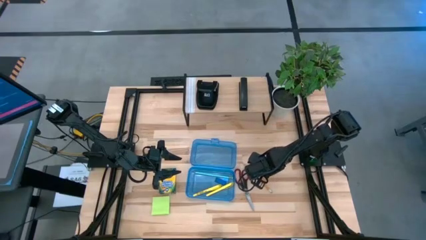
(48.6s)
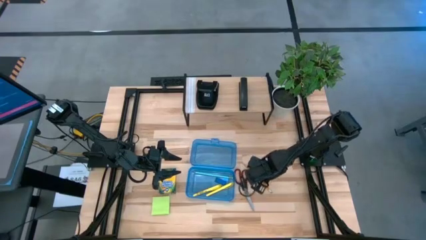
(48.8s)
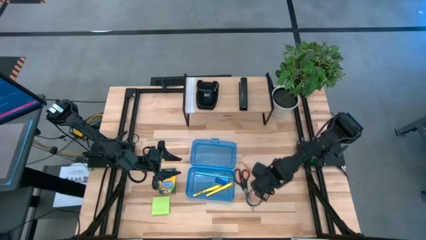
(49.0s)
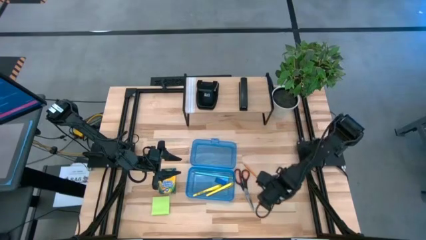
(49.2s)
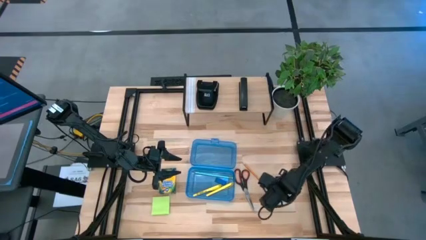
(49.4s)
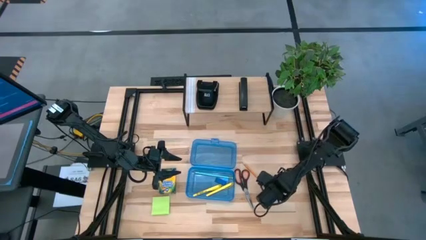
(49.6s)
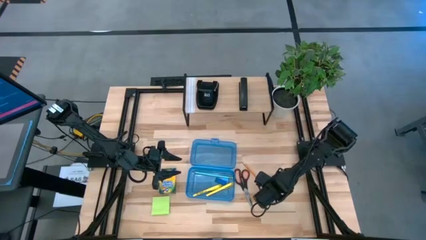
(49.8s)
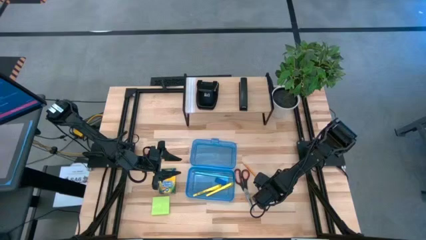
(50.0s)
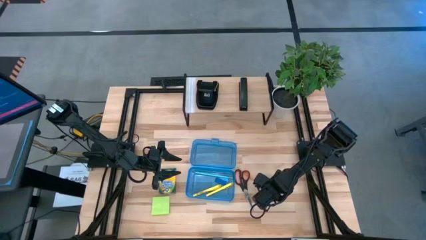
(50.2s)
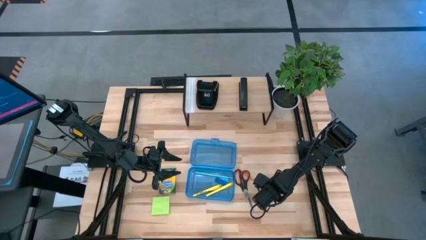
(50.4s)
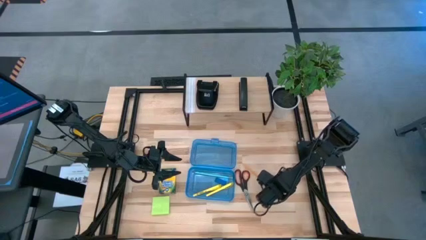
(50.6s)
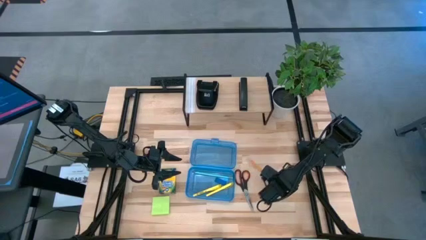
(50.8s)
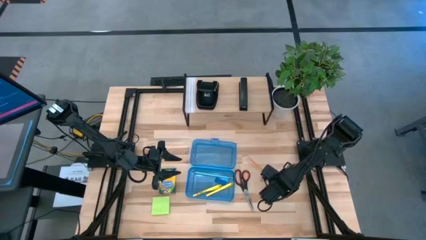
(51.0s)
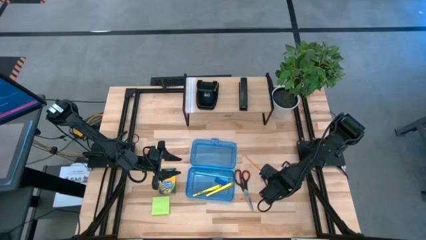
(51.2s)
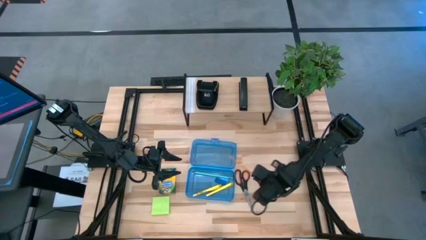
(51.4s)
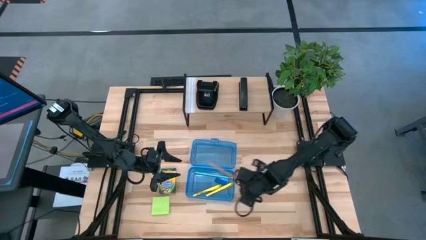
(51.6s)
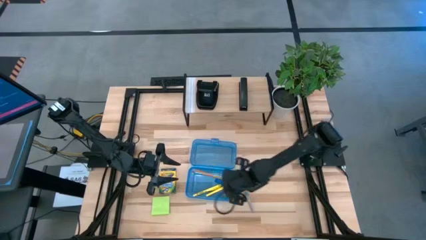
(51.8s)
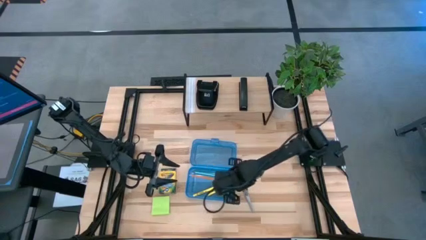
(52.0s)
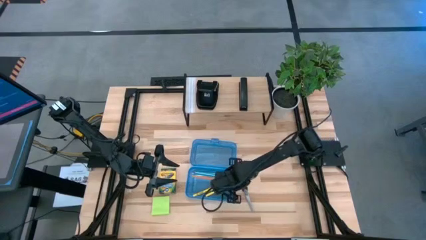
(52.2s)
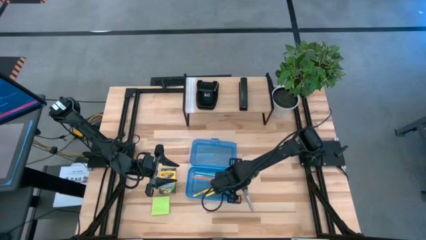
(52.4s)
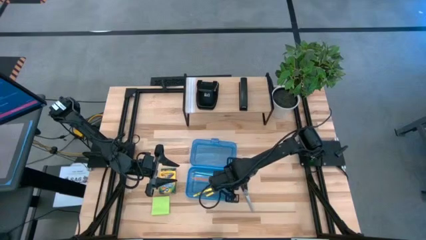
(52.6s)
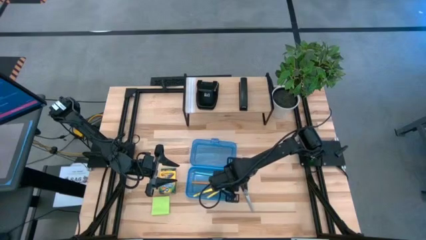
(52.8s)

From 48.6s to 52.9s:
Task: Pack school essentials
Put the orange pencil into the blue supply box

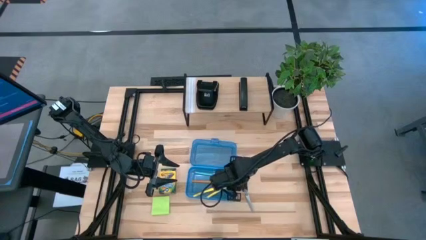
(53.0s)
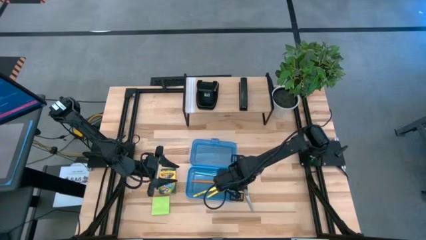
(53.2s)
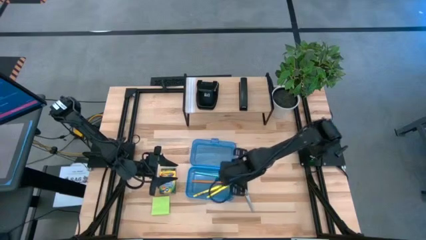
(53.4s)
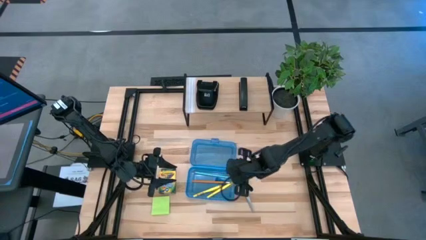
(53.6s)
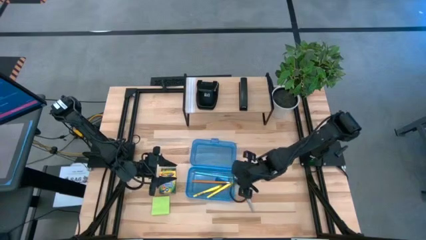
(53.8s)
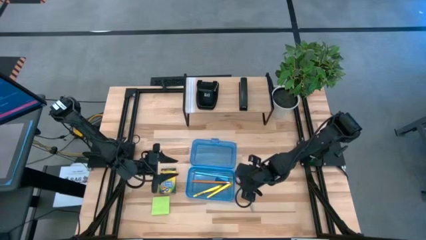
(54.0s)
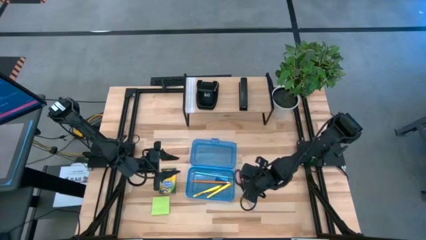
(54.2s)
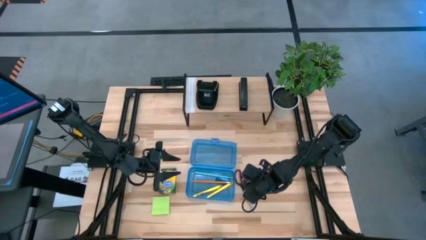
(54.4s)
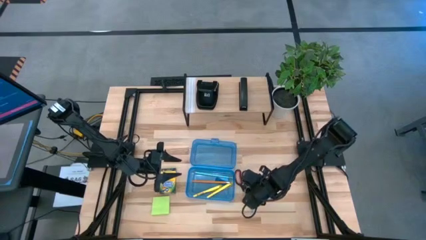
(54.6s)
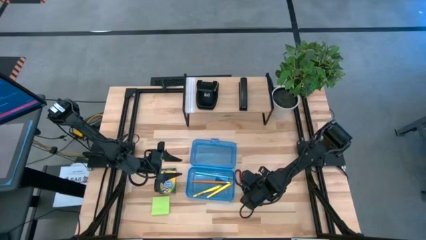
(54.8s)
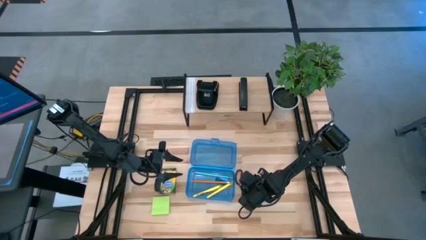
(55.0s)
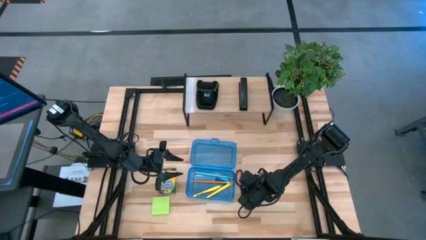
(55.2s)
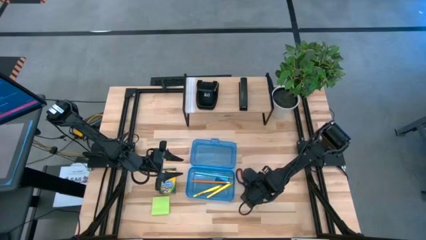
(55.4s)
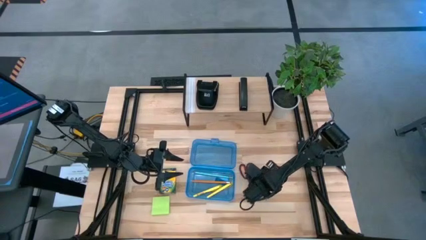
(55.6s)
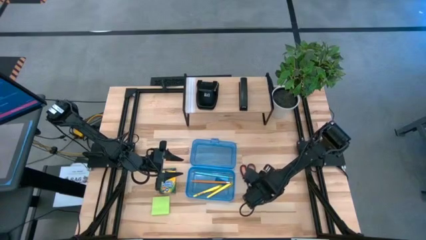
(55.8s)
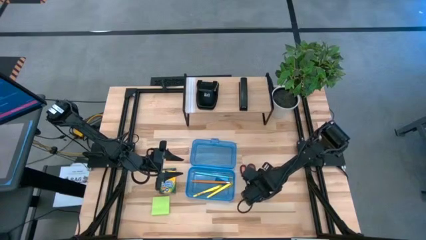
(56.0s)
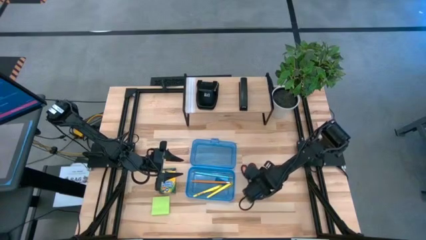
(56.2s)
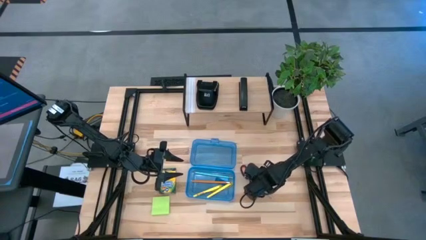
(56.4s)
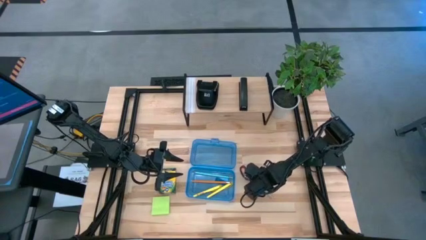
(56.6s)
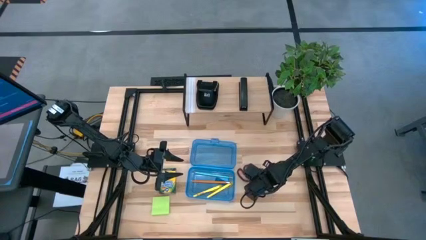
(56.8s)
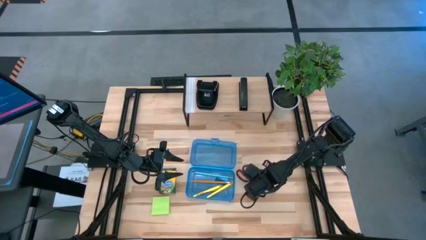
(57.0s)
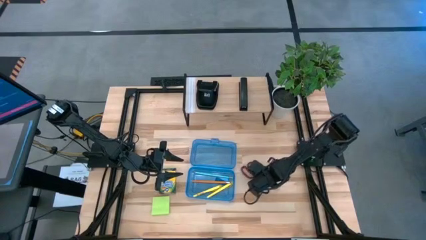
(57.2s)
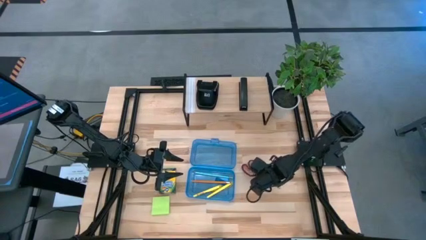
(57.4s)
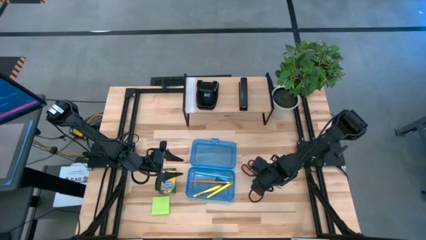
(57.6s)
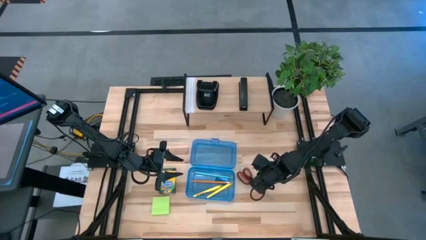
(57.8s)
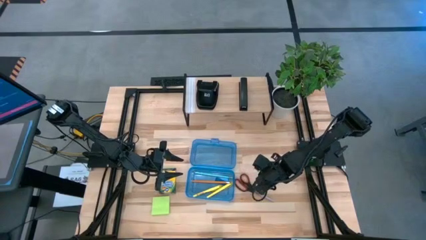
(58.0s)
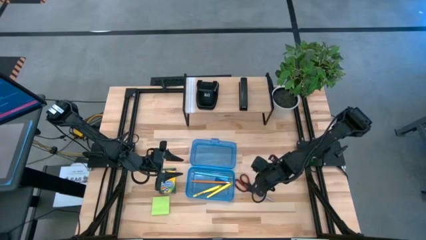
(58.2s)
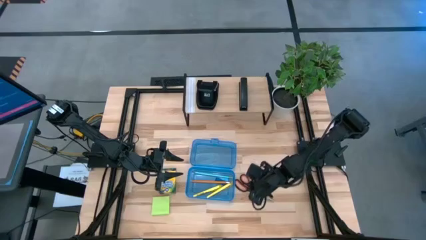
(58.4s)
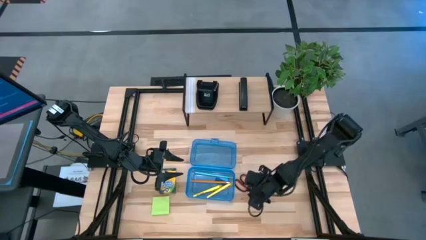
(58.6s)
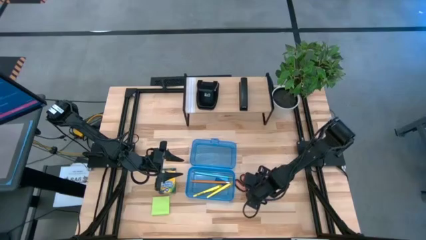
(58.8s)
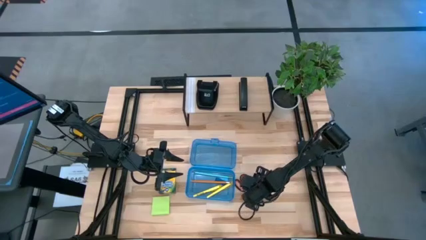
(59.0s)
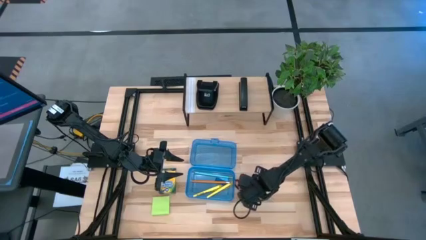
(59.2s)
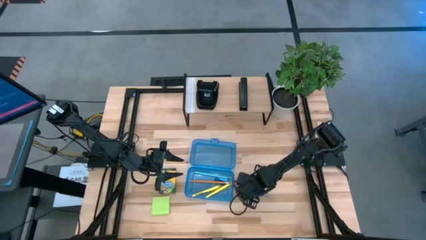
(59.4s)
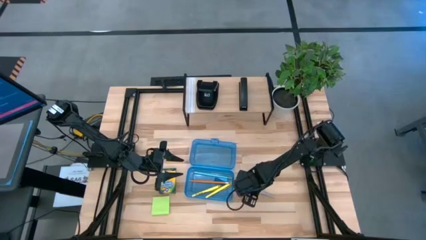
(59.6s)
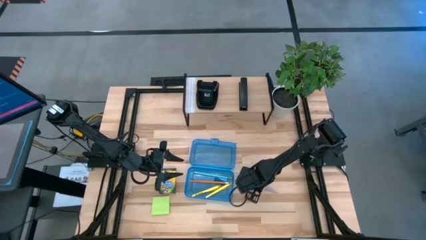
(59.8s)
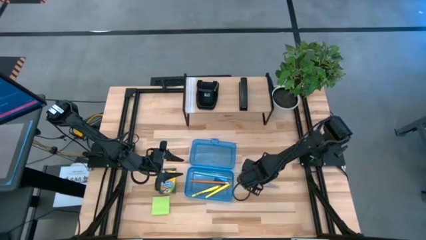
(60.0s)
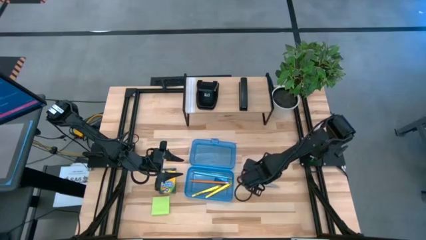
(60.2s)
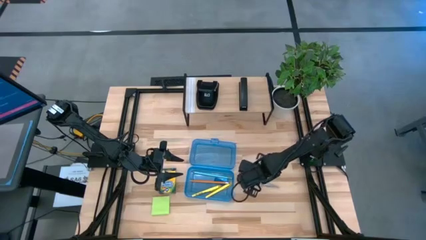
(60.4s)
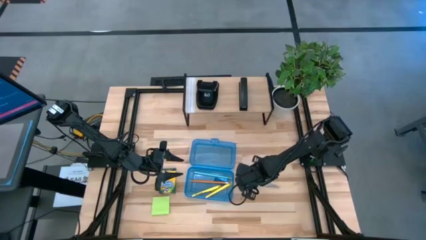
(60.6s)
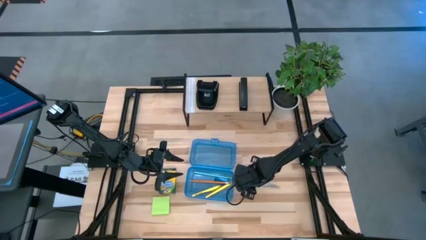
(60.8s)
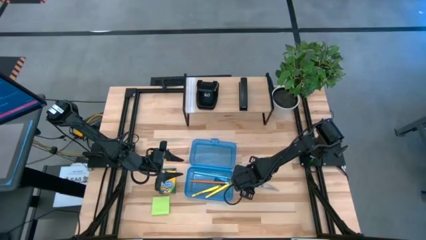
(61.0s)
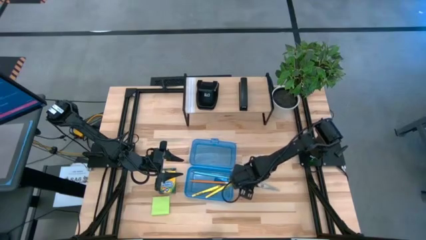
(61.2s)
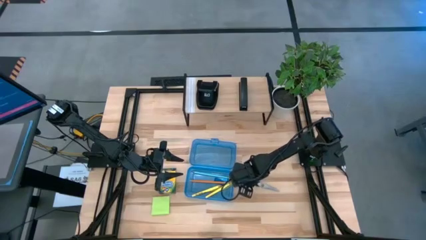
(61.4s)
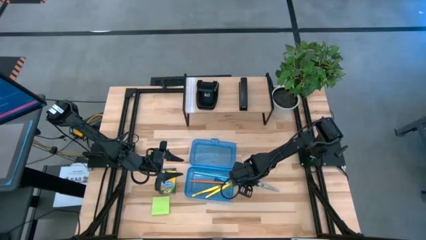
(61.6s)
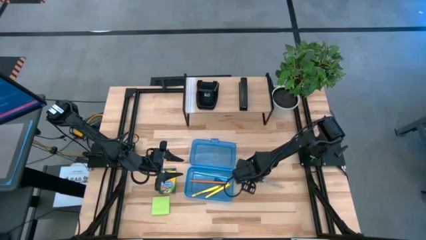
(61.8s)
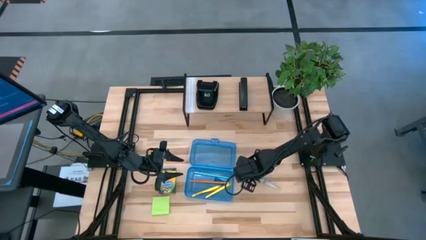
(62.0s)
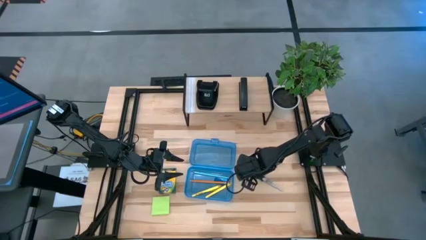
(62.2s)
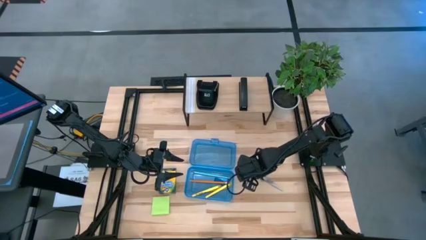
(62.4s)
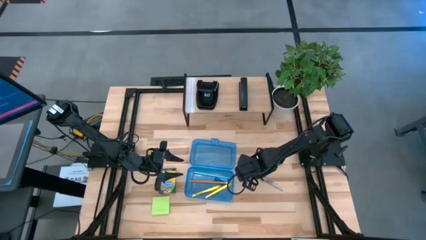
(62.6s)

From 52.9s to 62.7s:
Put the black scissors into the blue supply box

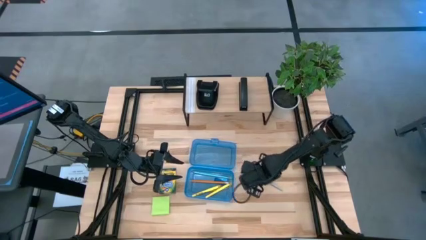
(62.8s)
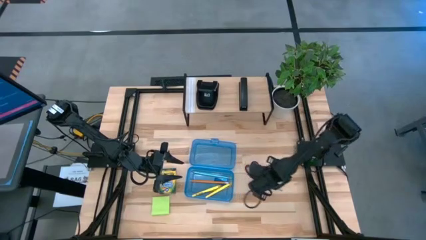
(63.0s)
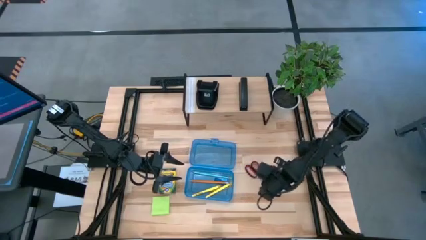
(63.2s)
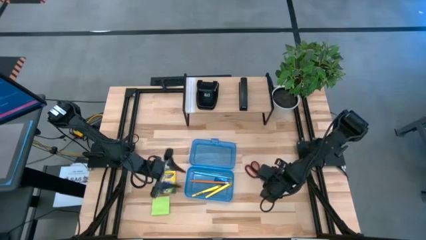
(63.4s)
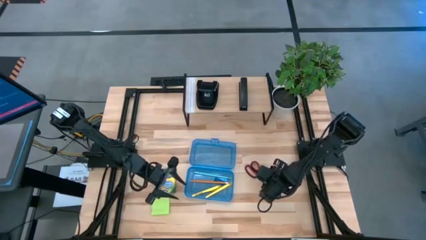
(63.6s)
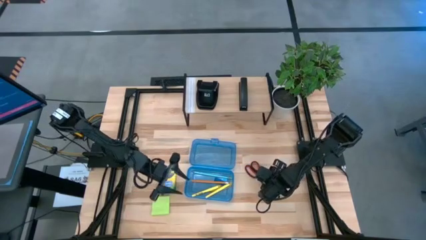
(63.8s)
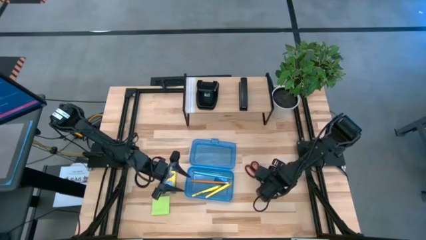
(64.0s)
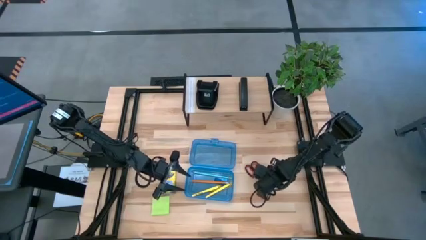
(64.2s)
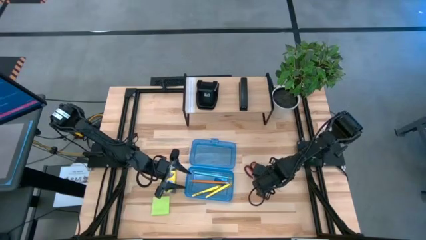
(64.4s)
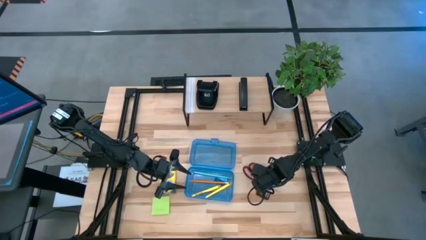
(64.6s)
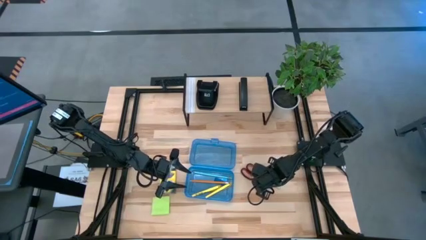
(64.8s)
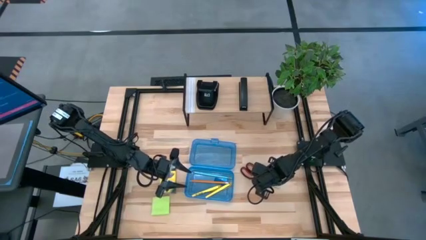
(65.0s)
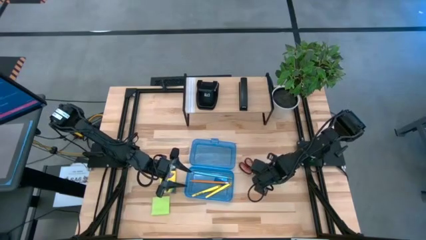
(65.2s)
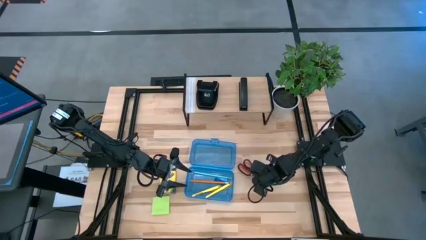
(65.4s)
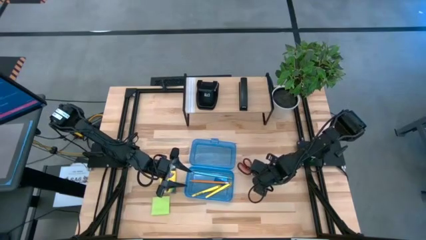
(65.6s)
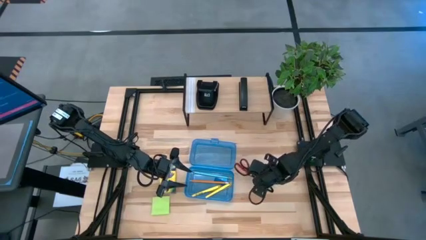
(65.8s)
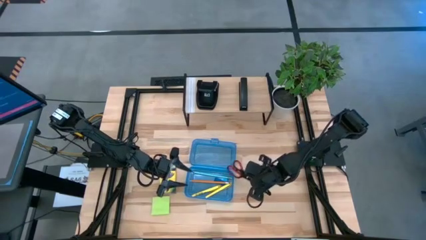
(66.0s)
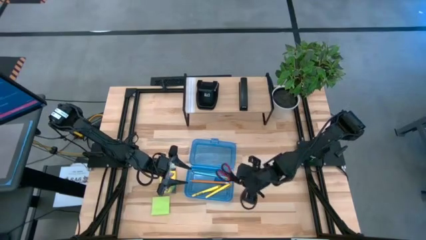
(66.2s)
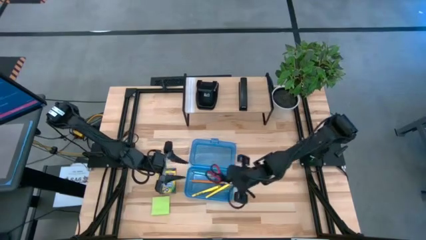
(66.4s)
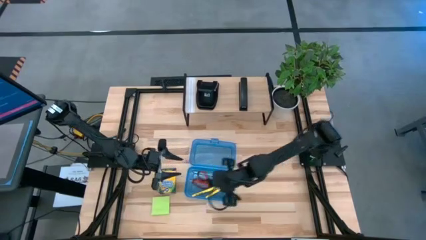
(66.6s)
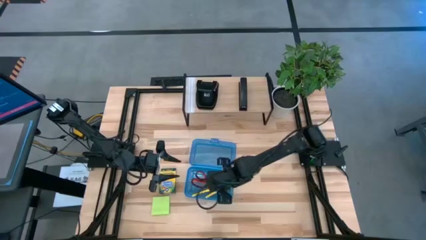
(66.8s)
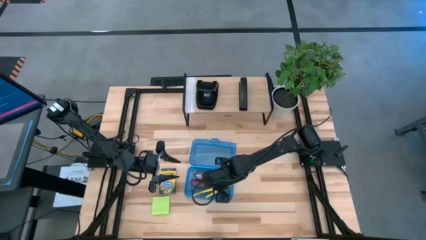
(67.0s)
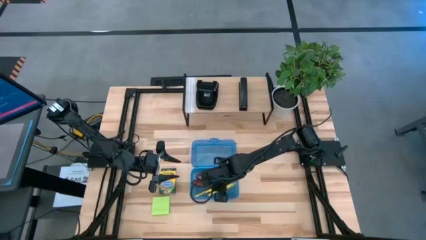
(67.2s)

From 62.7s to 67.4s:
Put the black scissors into the blue supply box
